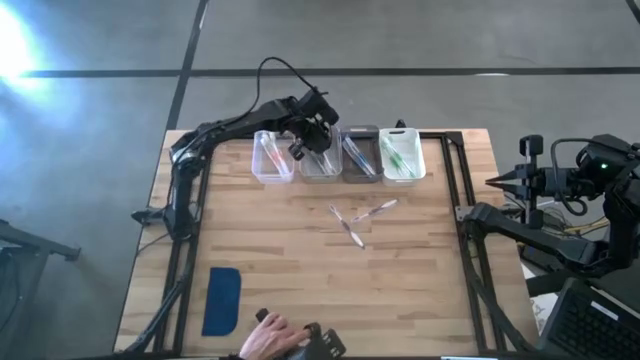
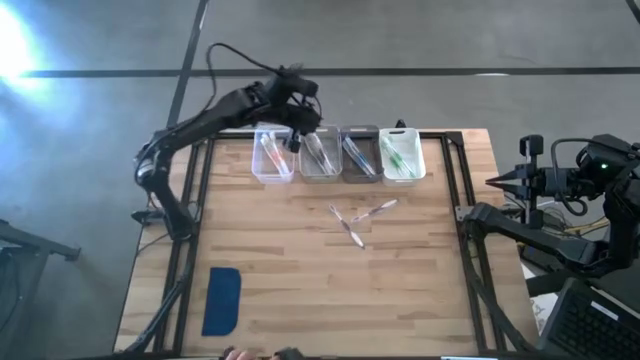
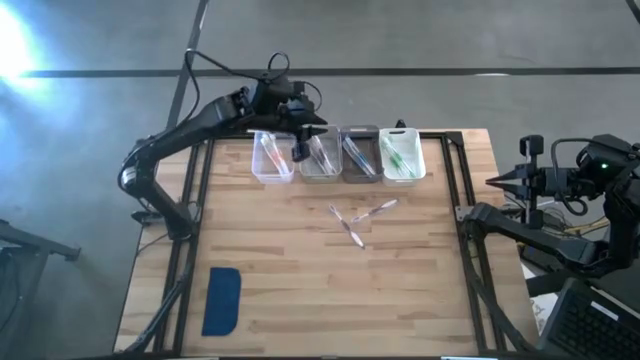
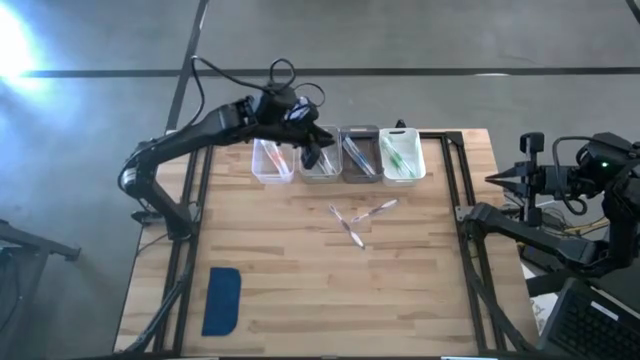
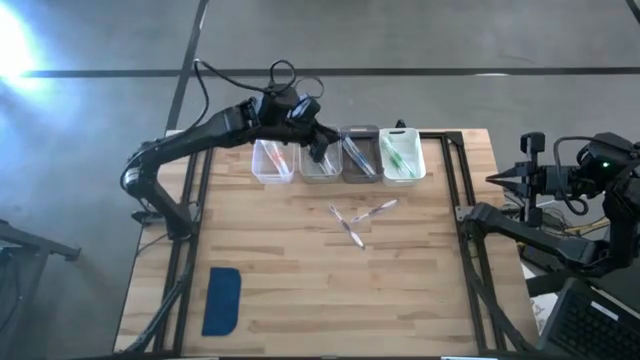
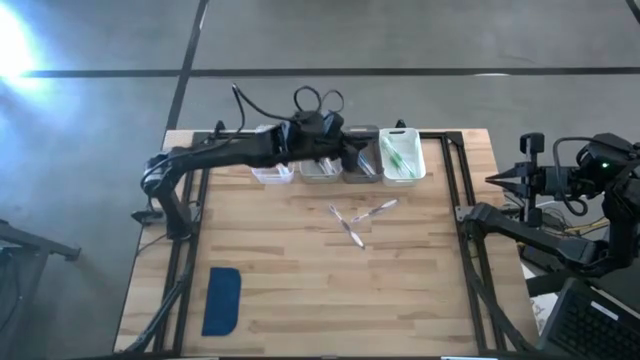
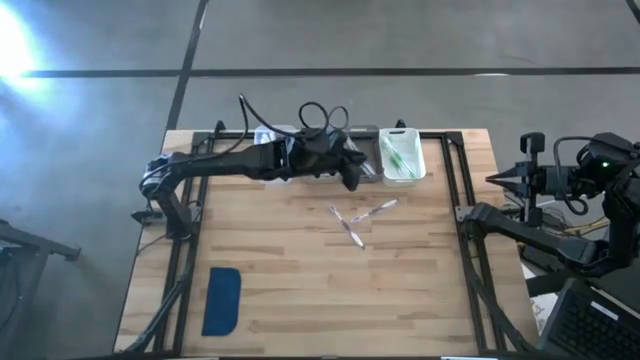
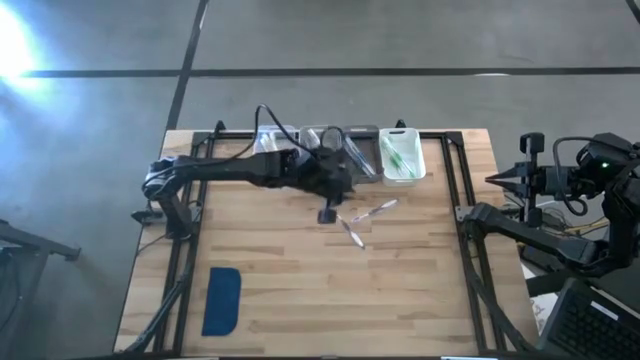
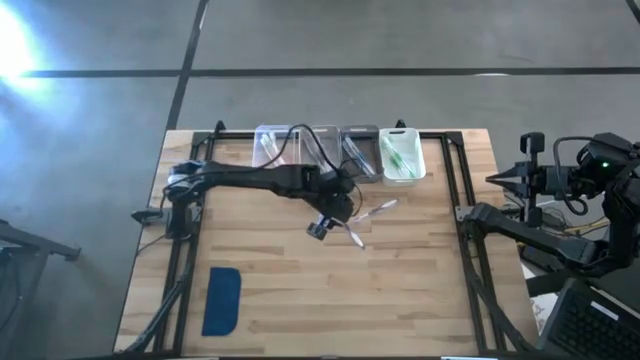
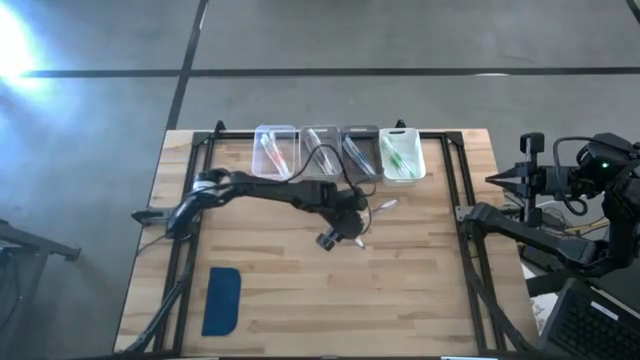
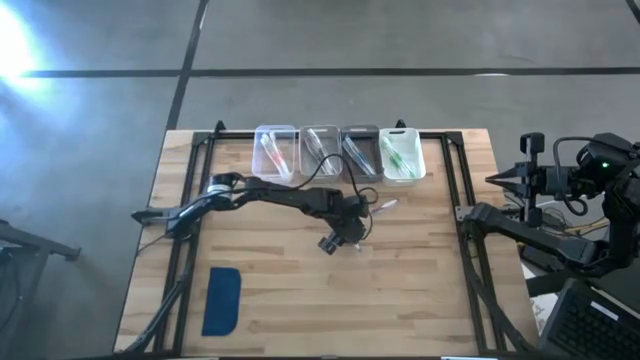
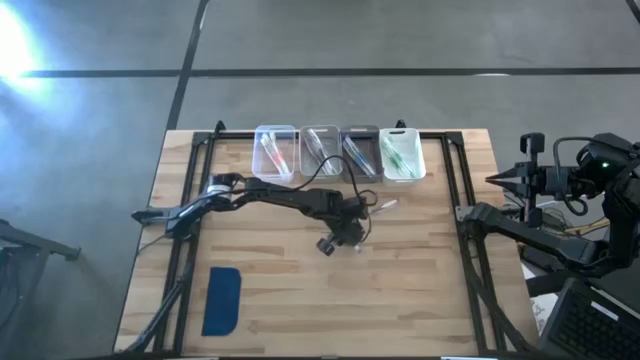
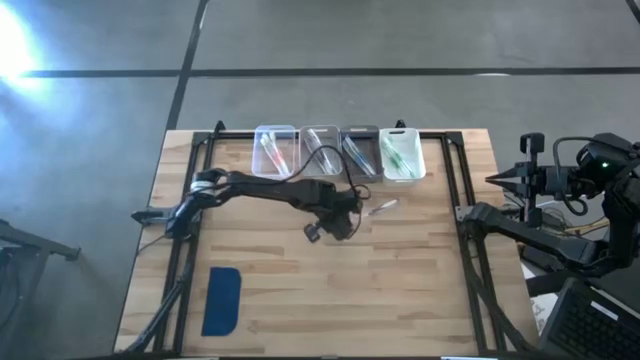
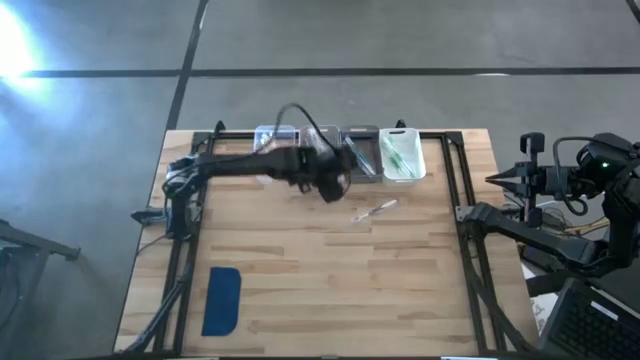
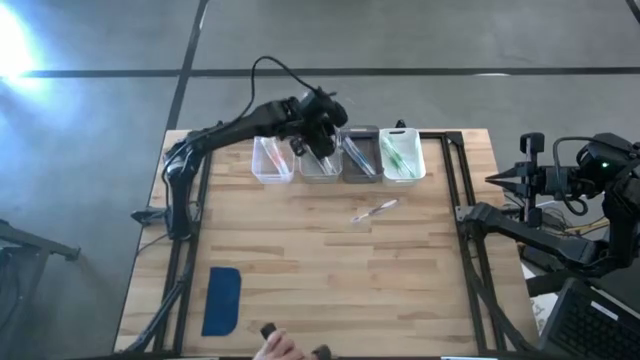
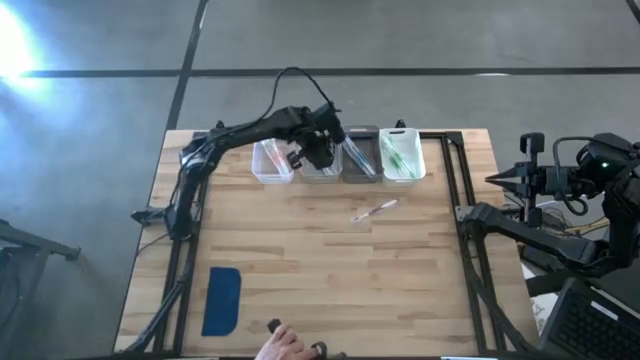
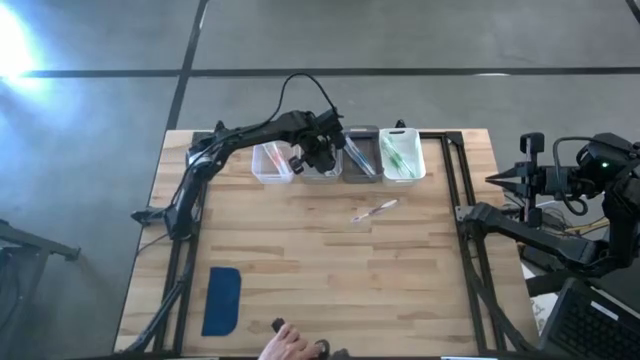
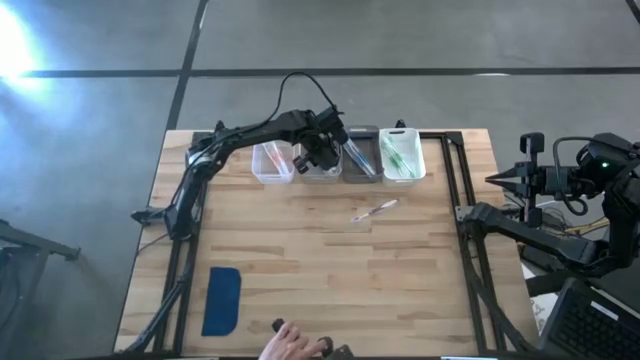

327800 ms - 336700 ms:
Task: Pick & Place Toothbrushes
Put the purple toothbrush into the gray bin

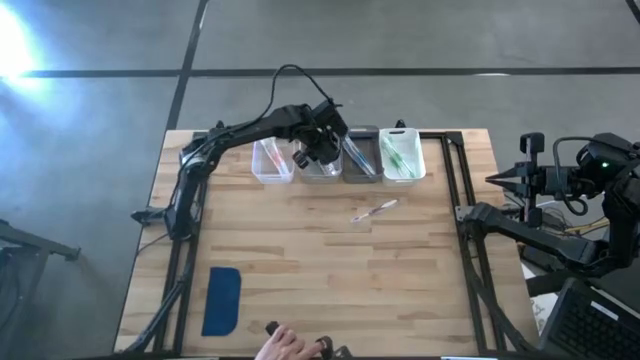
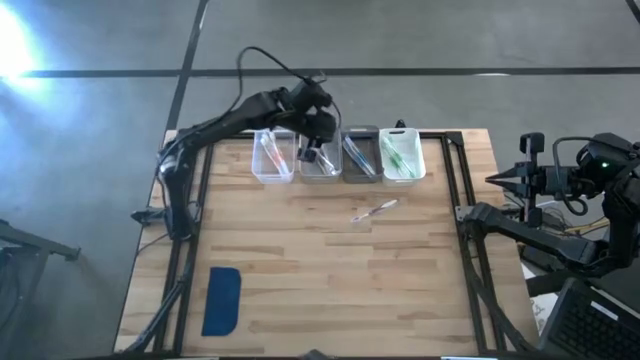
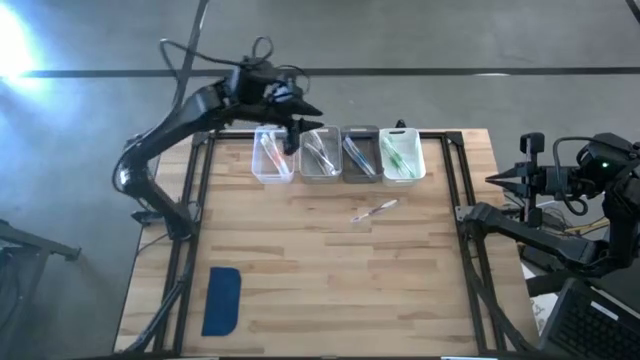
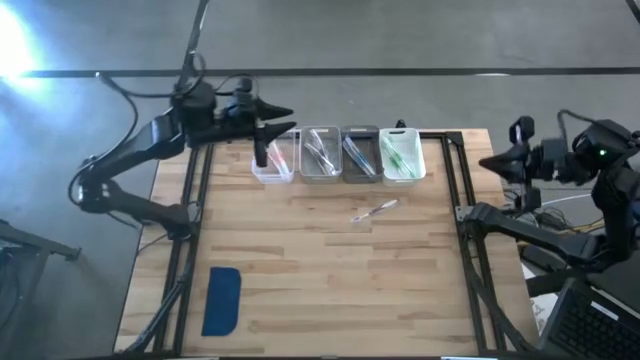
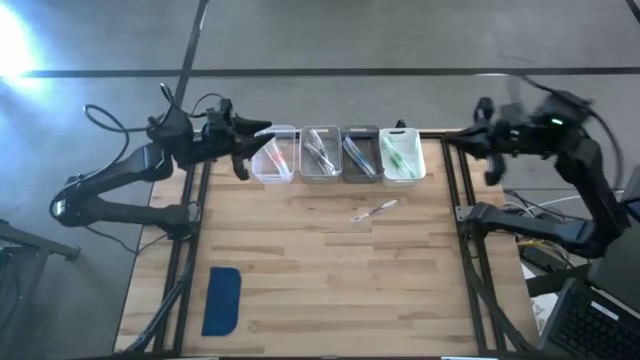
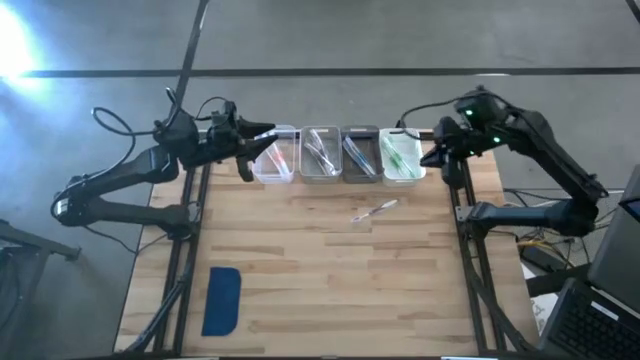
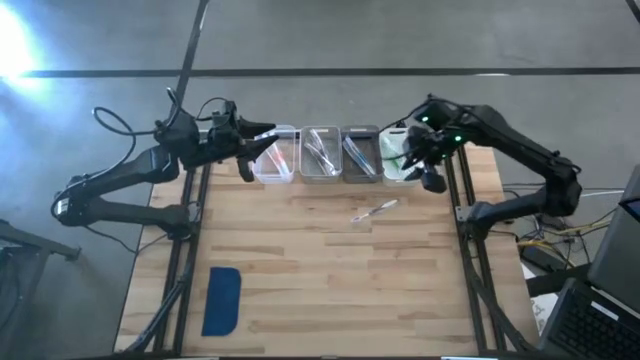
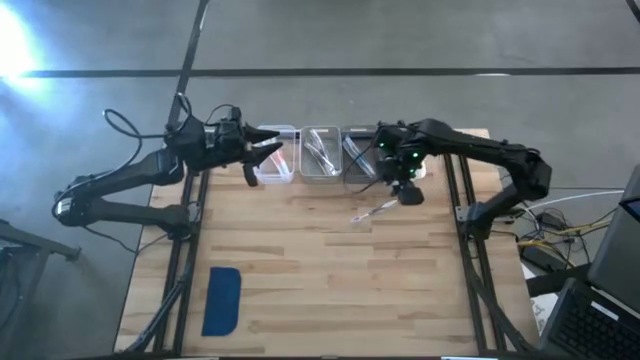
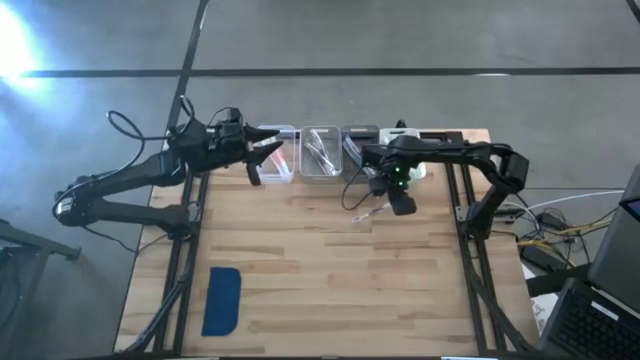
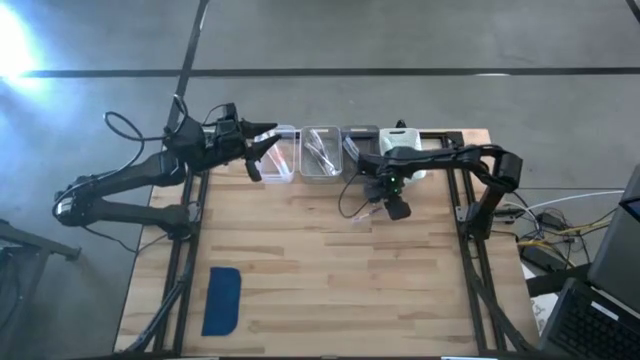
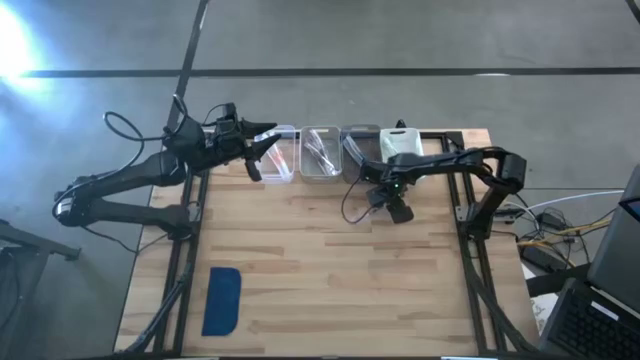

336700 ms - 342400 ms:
Put the purple toothbrush into the gray bin

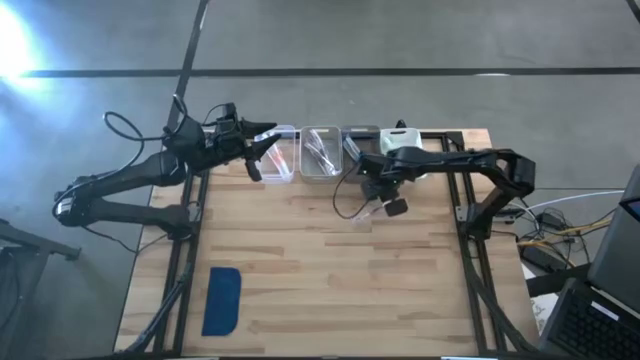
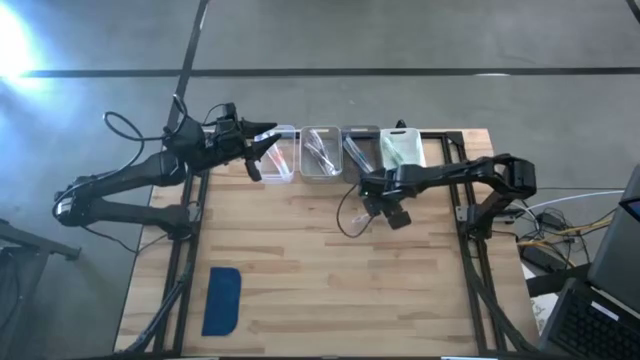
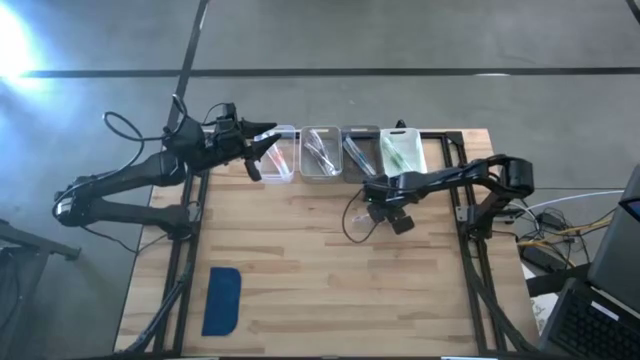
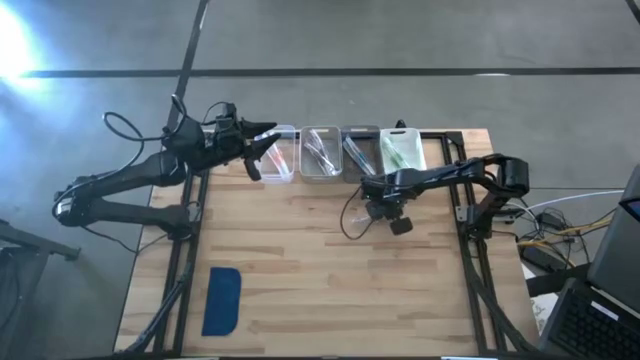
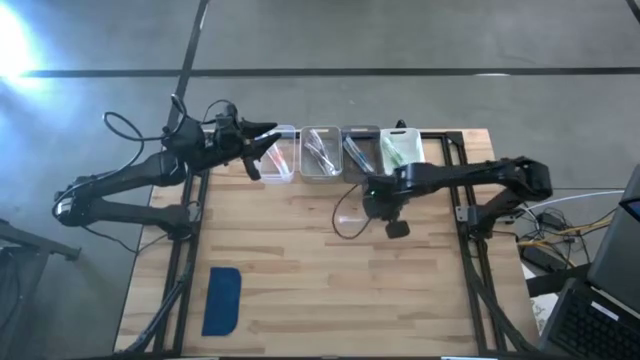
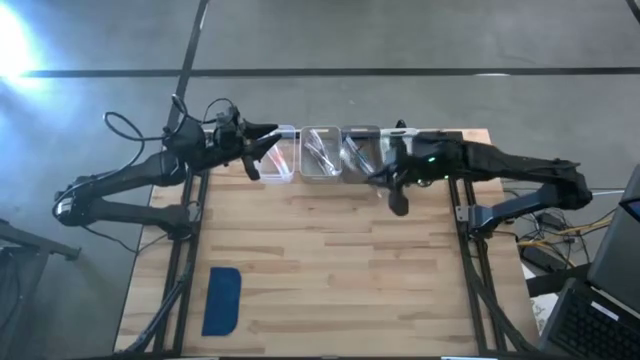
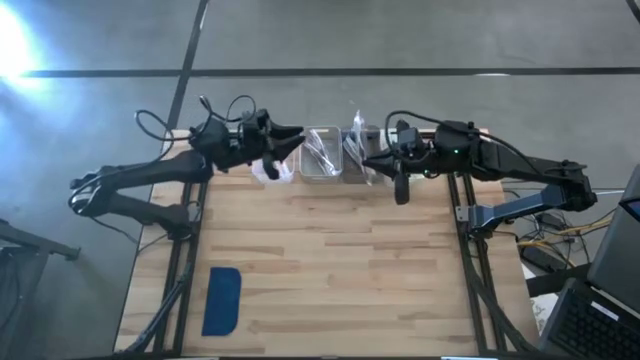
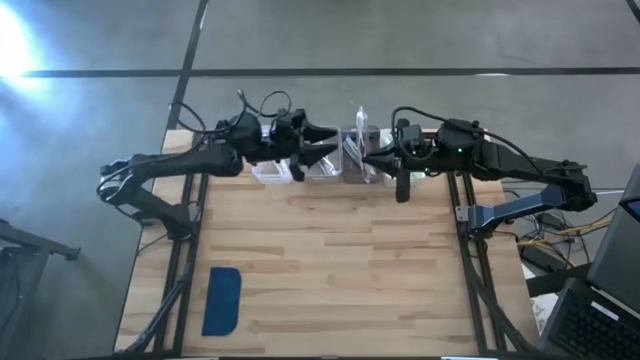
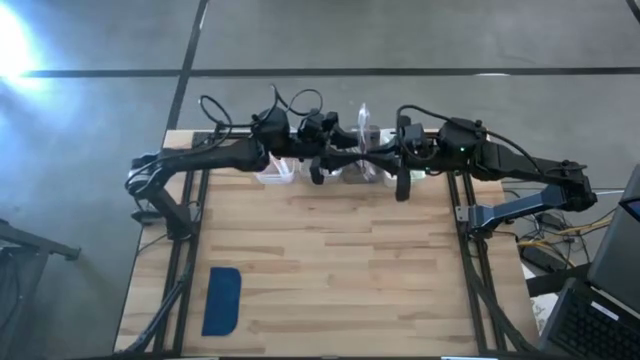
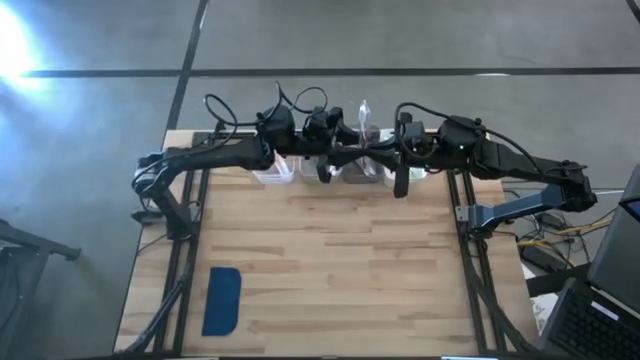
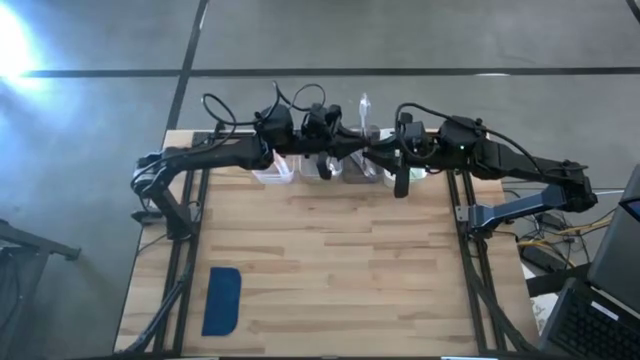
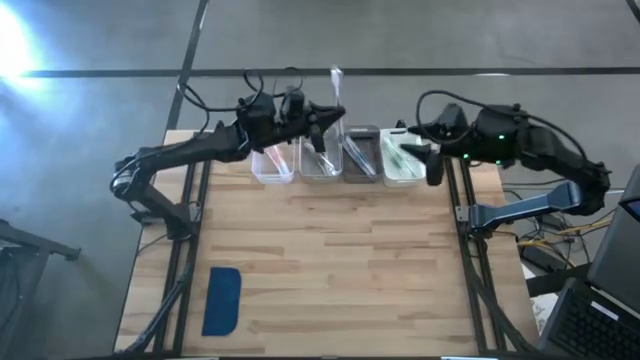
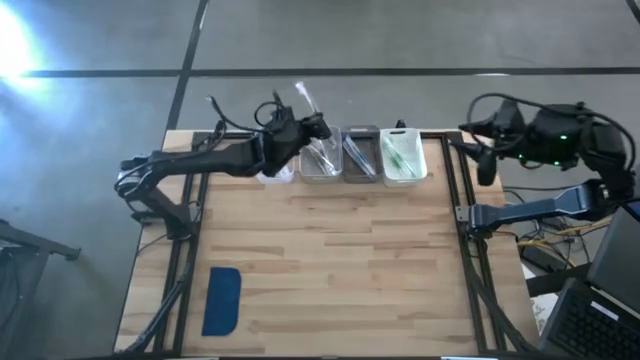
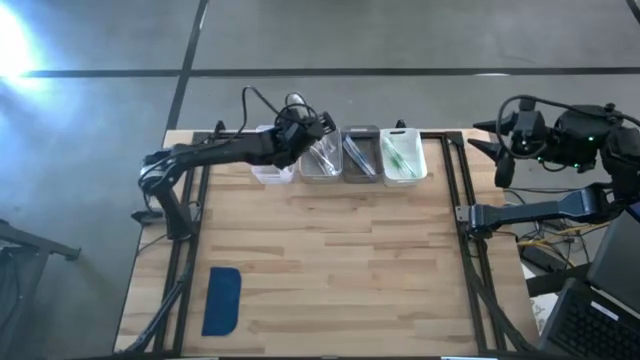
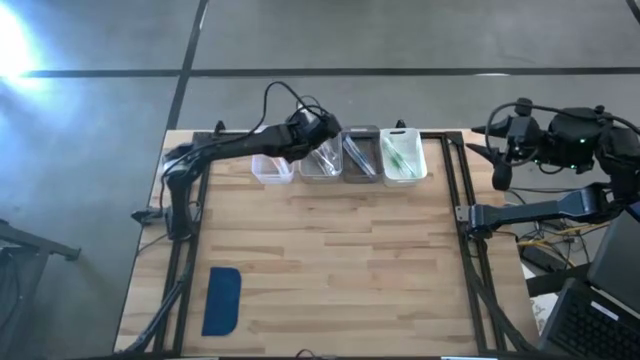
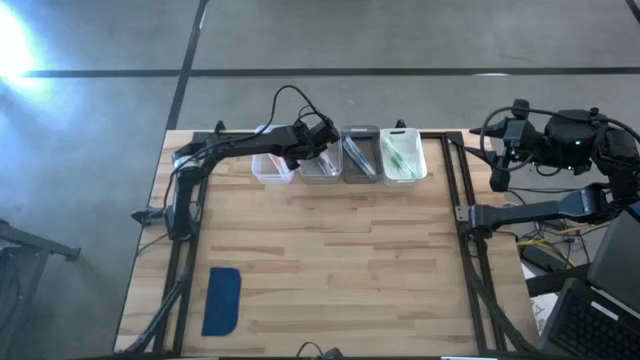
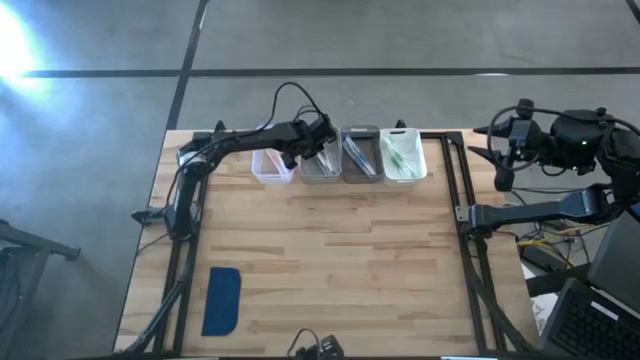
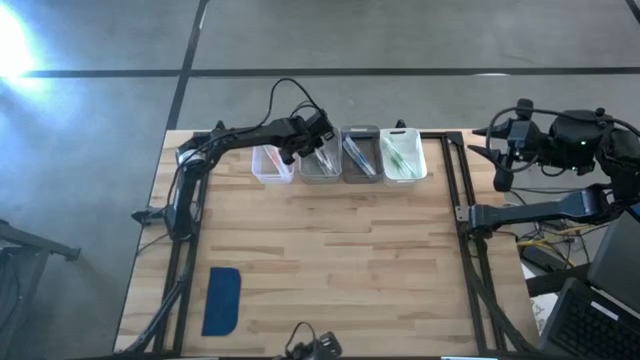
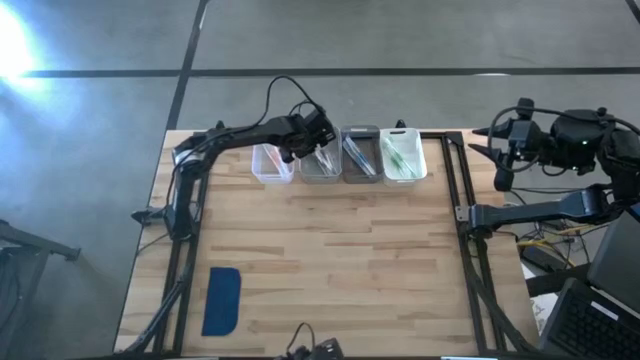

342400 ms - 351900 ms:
Put the purple toothbrush into the gray bin
